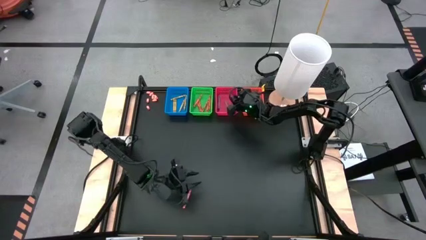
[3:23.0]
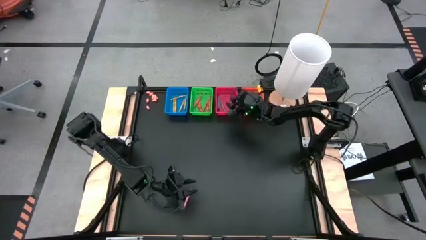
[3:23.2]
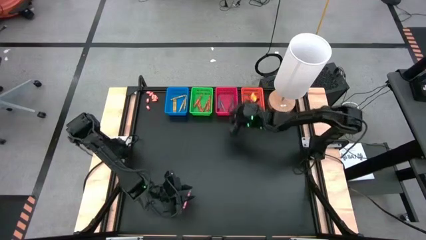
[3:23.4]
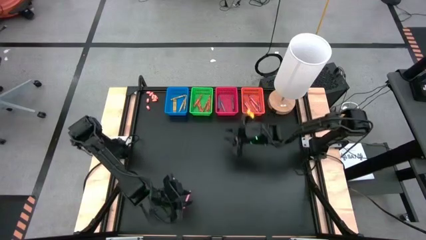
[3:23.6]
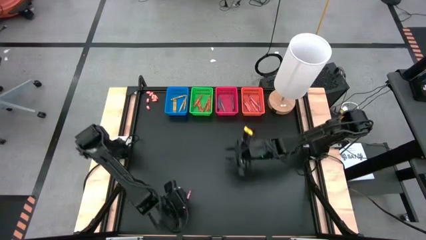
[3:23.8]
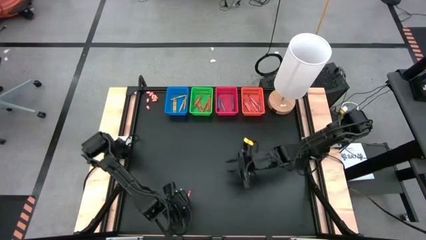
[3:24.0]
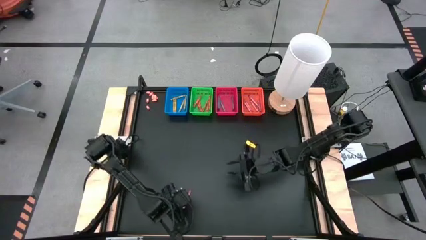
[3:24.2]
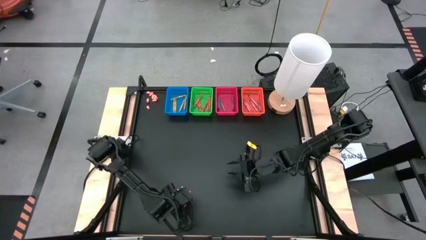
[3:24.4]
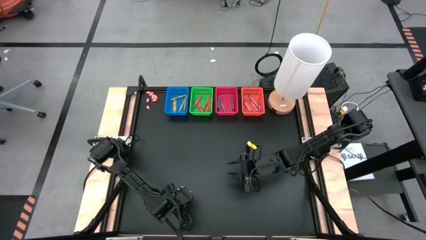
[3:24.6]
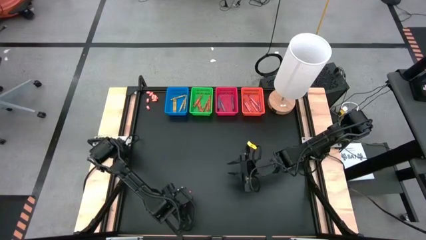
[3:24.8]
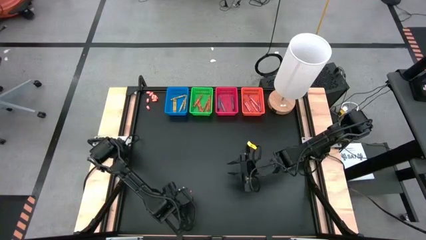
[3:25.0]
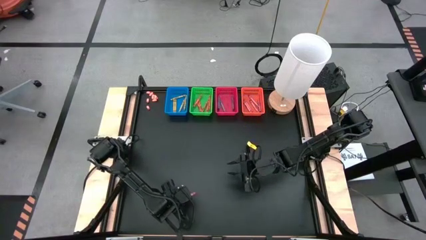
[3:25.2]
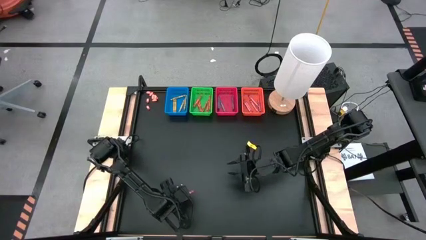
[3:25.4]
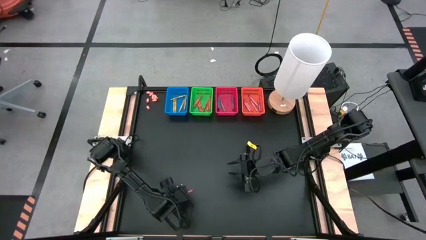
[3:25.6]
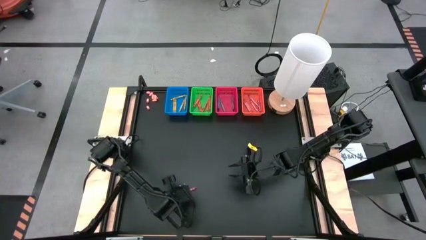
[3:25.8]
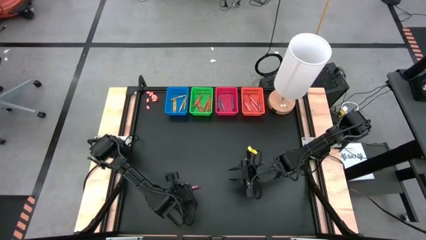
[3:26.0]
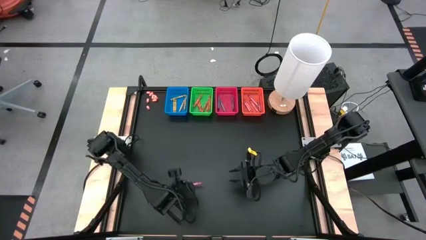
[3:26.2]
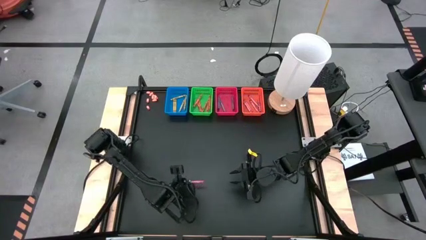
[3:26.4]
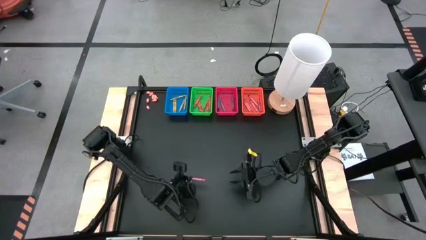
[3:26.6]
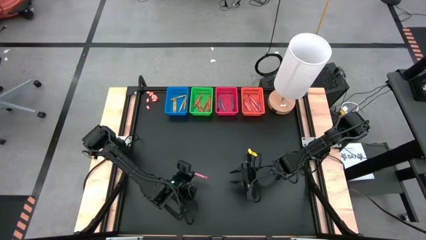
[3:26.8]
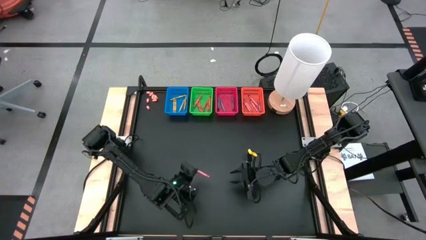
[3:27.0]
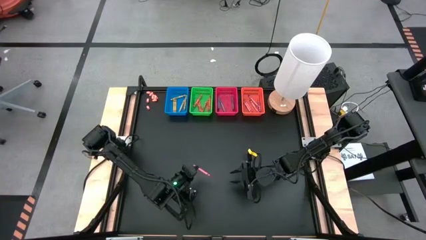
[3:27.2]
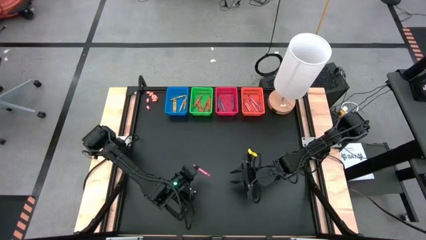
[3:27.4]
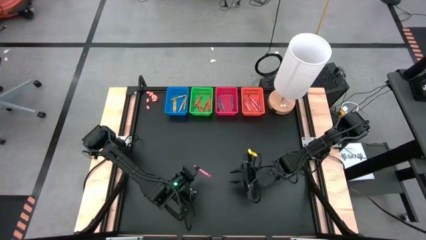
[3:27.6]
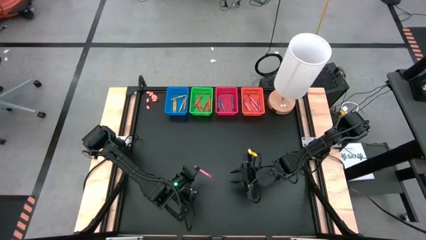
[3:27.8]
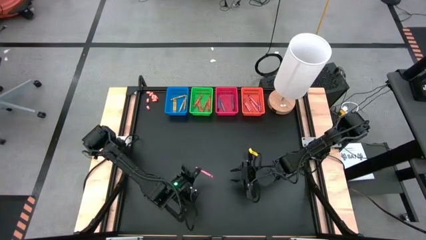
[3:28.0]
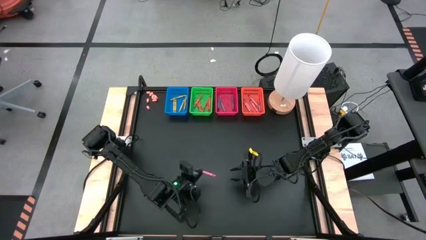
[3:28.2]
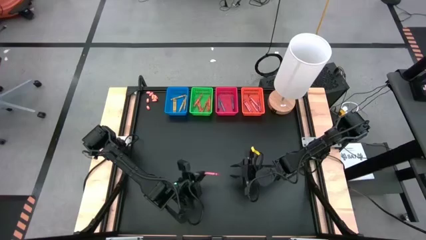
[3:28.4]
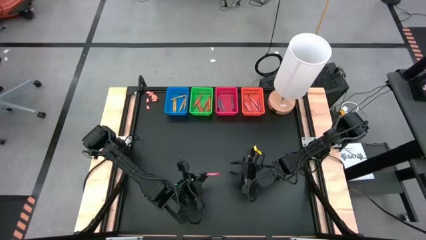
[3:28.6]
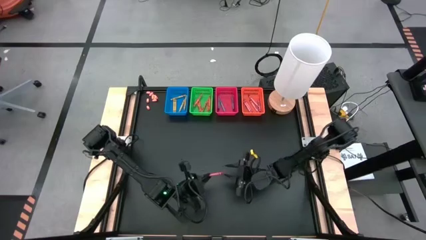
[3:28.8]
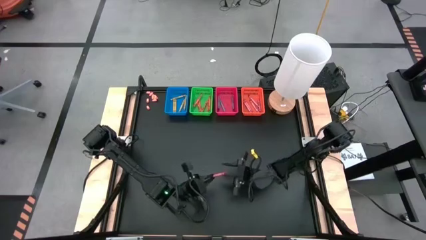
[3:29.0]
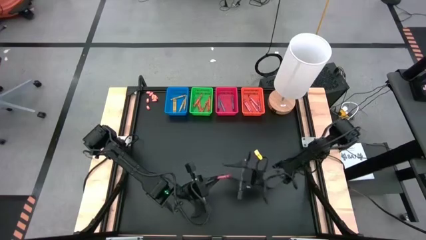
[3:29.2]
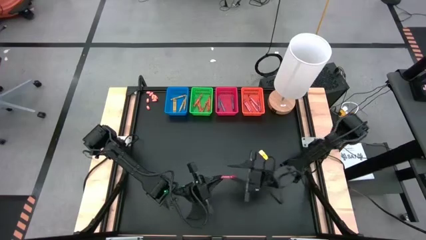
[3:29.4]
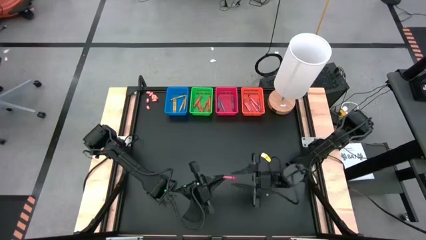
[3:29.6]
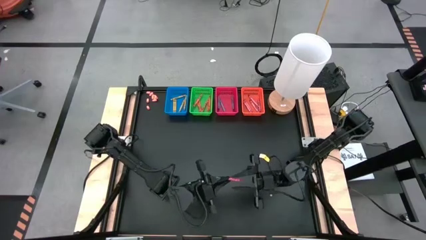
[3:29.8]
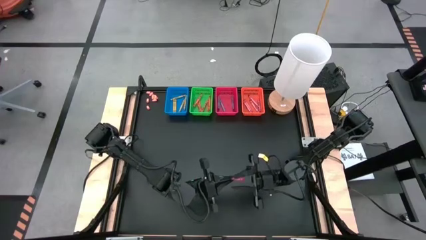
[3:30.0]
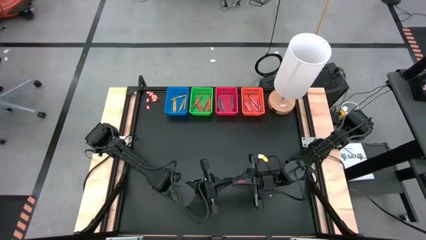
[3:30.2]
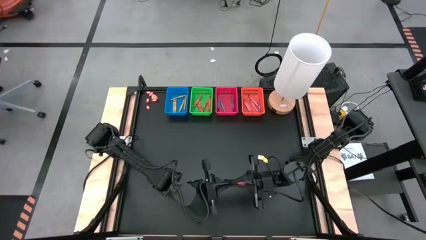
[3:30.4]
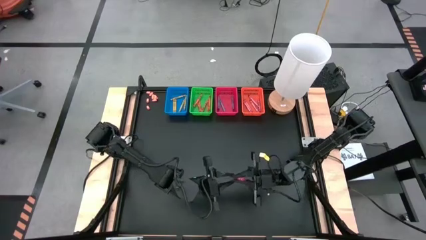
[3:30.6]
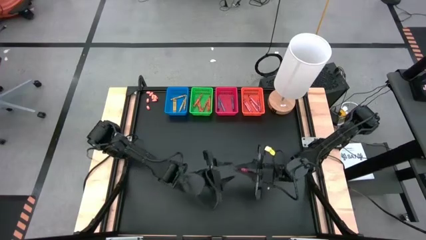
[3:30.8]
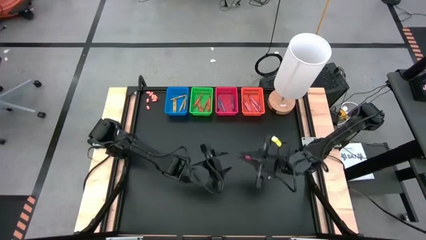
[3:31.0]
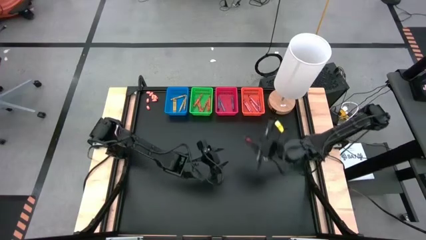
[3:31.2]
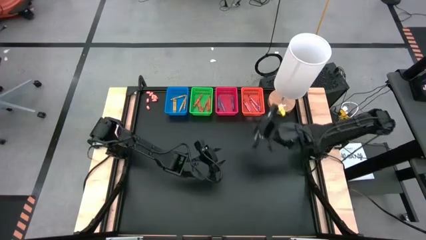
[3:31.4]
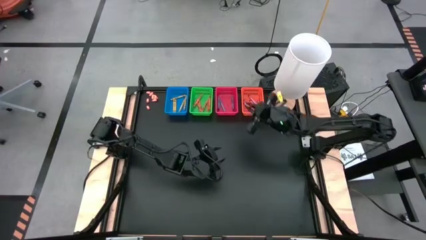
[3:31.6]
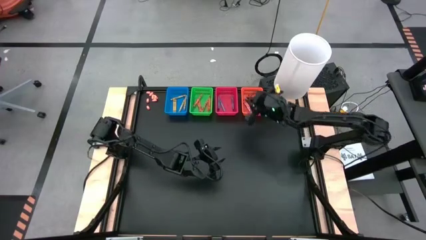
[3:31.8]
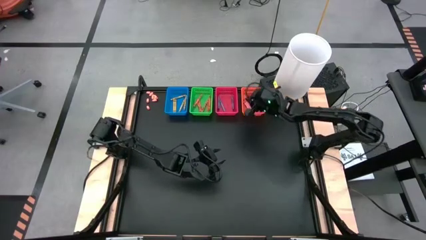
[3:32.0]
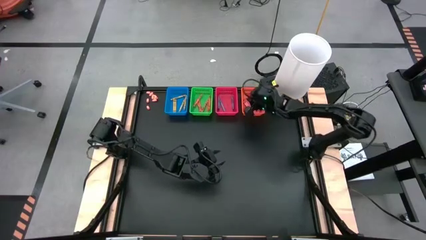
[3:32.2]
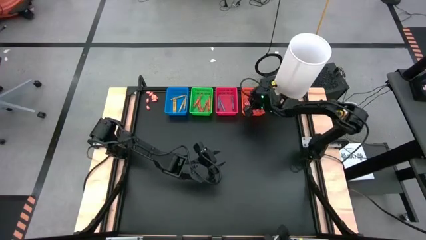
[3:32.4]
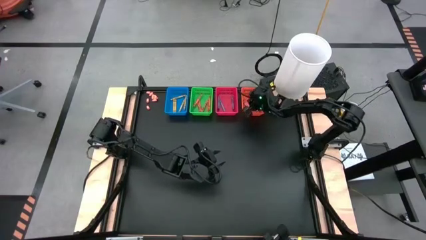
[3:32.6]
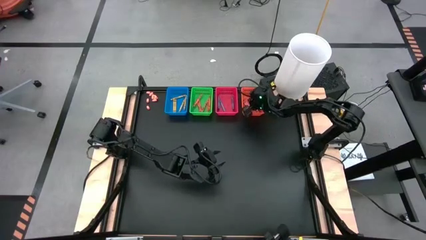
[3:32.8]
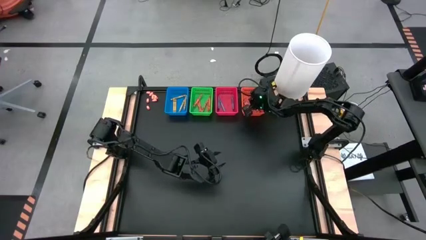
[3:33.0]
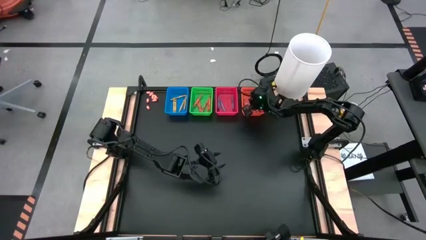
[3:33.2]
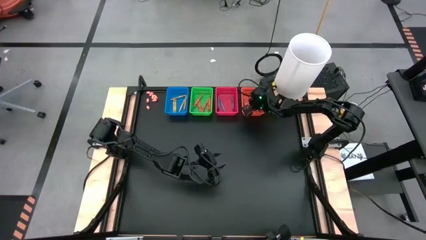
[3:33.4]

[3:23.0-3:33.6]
Task: Sort crayons
Put the red crayon into the orange bin

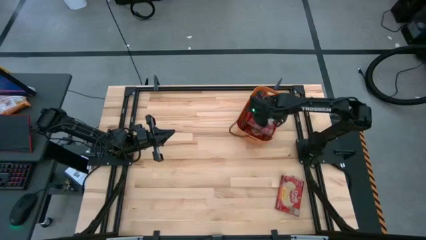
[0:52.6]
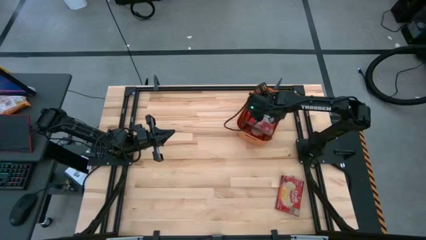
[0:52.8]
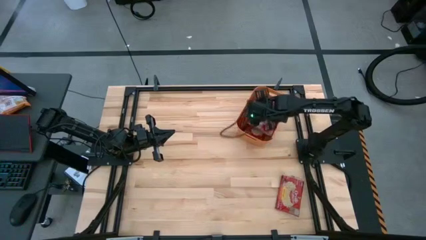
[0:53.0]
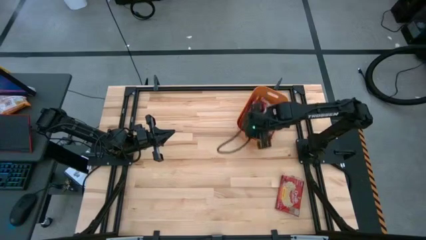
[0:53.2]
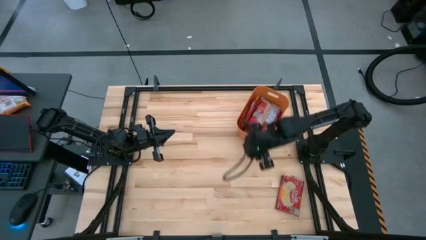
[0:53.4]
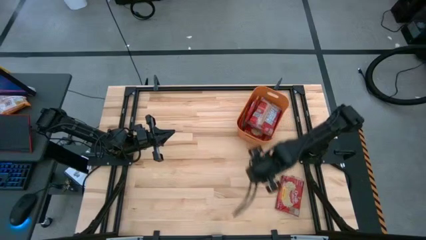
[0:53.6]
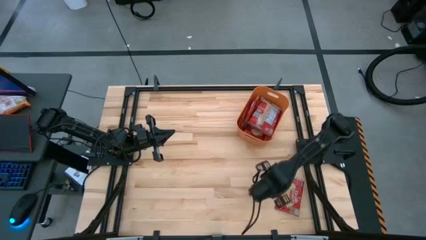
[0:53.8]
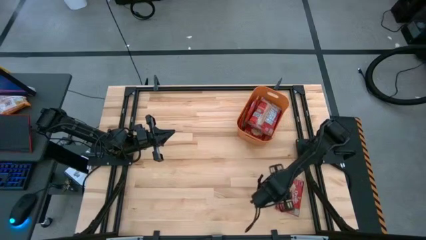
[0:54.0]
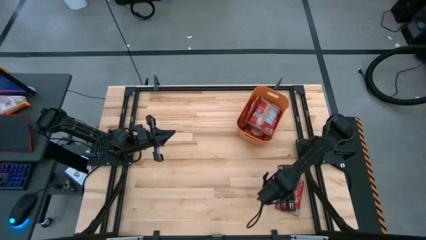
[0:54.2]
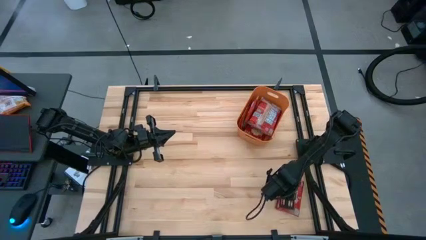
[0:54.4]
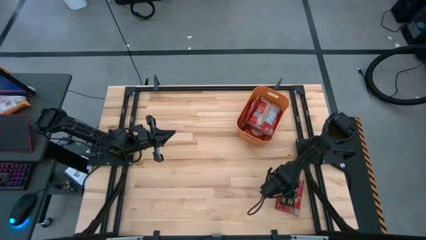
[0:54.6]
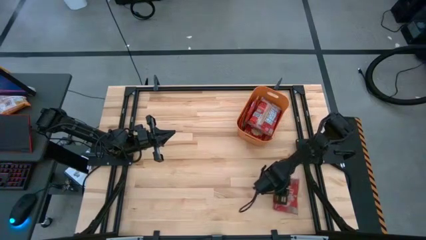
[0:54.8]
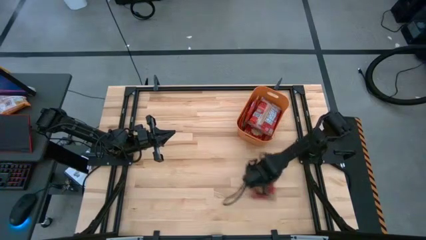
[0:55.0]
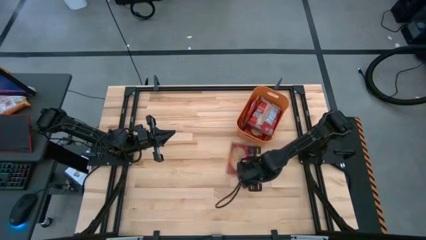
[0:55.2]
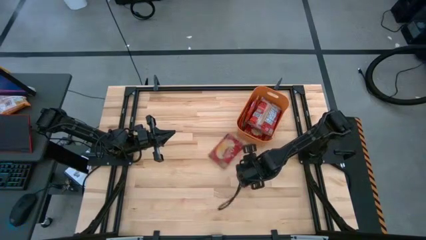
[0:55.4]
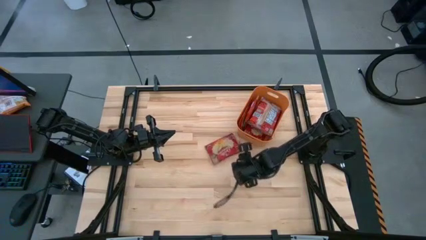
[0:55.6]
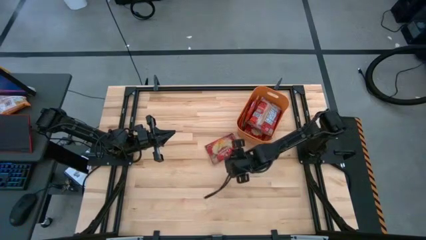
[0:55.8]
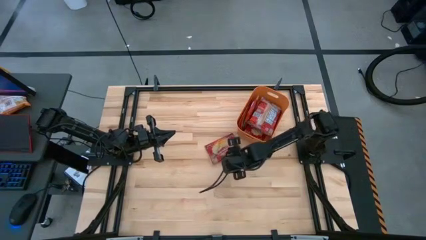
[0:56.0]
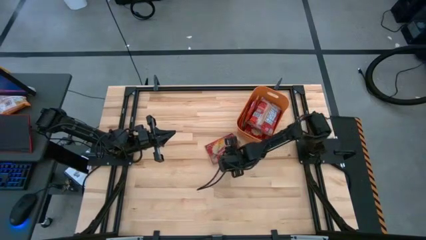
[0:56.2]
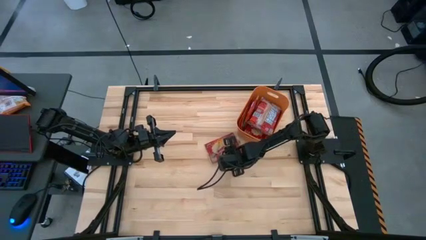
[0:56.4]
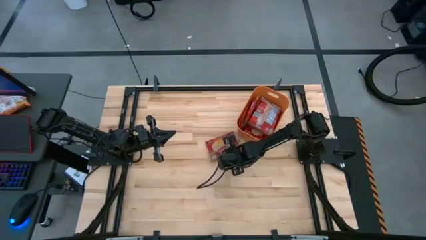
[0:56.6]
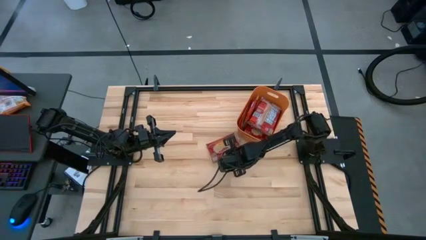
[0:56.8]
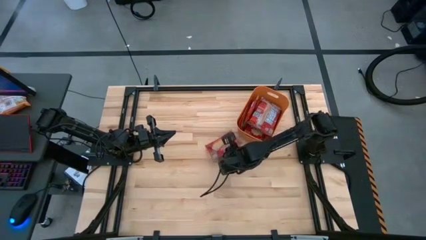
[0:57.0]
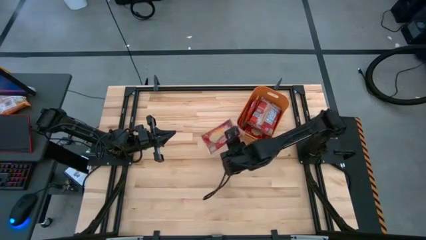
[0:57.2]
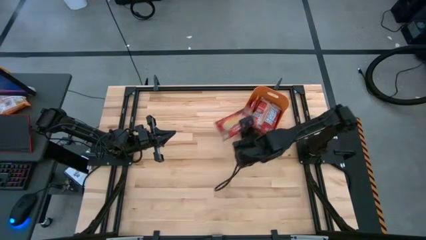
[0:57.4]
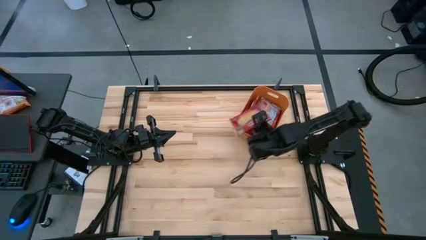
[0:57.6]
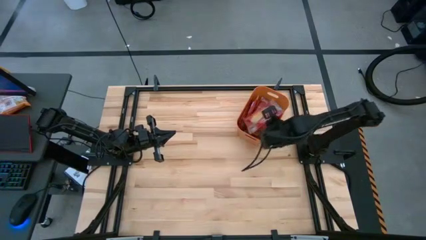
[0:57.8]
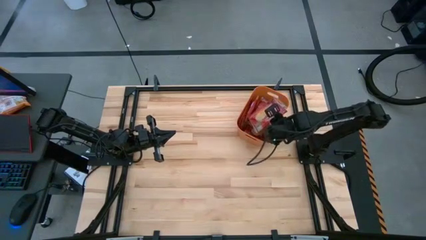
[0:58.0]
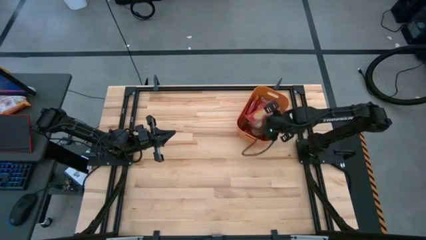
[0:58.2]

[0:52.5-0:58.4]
Task: Sort popcorn bags into baskets
Put the red popcorn bag into the orange bin

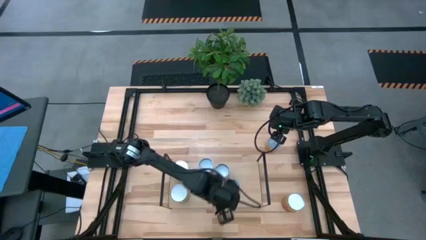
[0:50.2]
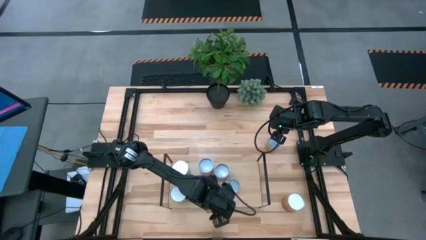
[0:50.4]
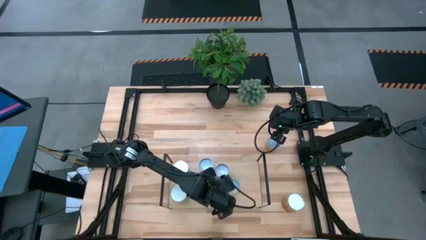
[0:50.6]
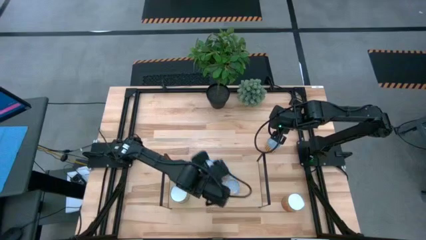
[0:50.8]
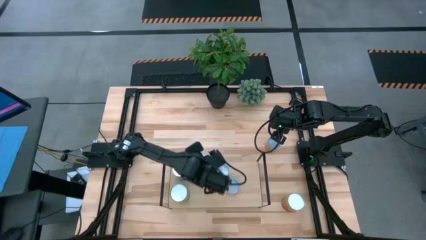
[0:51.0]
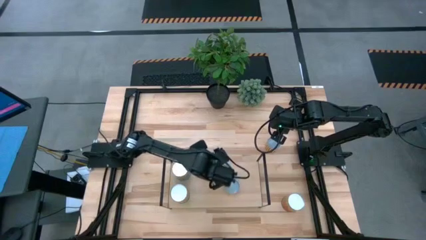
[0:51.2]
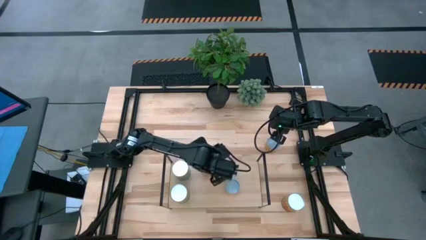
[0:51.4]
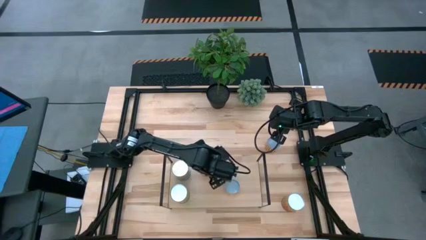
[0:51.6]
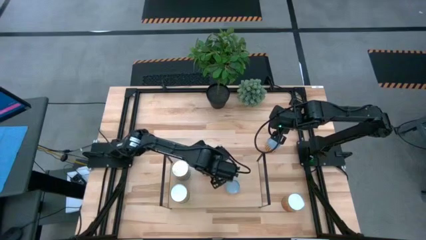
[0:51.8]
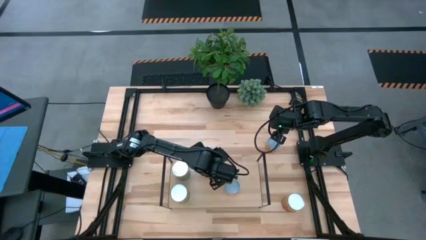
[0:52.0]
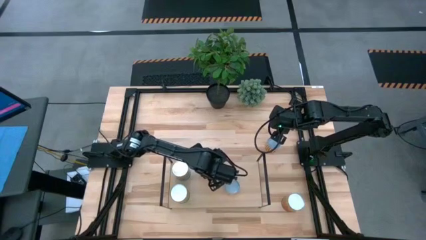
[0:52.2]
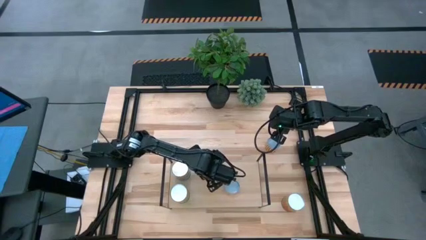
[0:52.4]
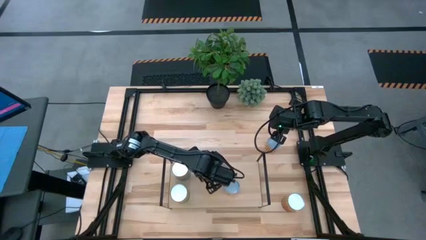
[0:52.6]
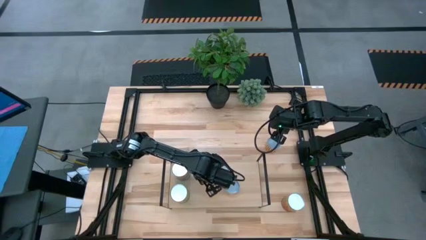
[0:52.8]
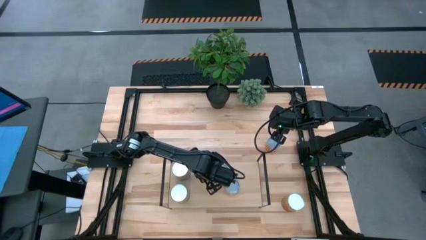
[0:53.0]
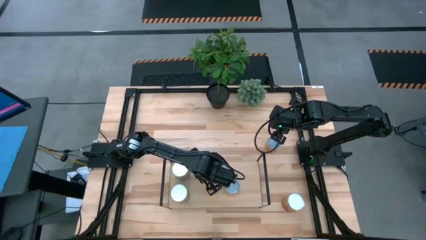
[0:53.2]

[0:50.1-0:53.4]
Task: Pick and place cans onto a shelf
Adjust the orange mix fruit can on the shelf
